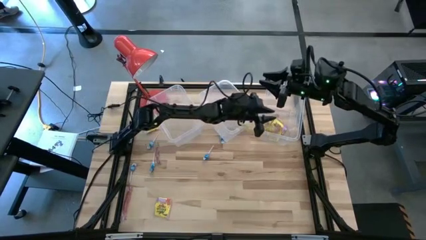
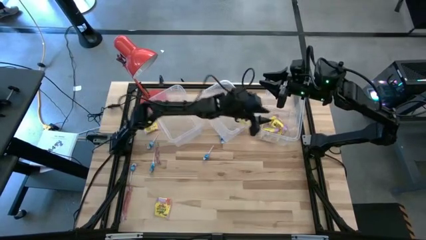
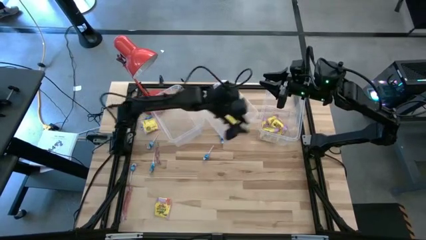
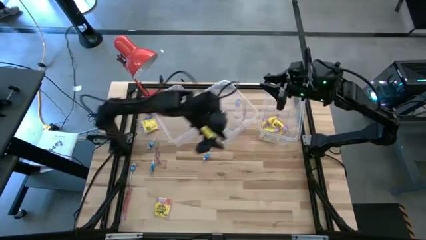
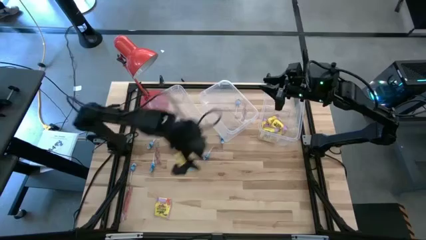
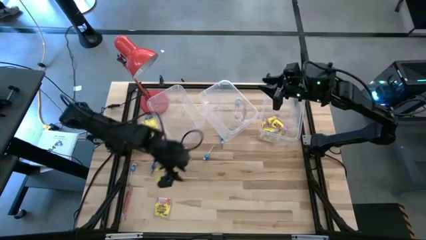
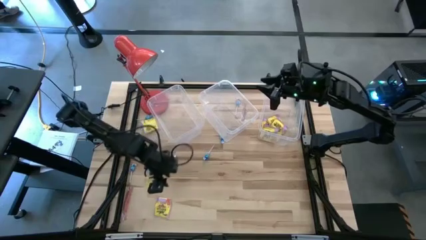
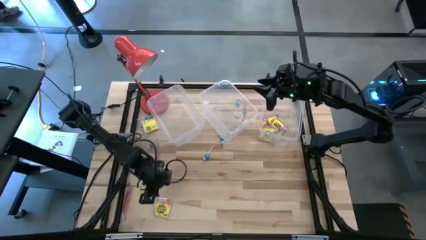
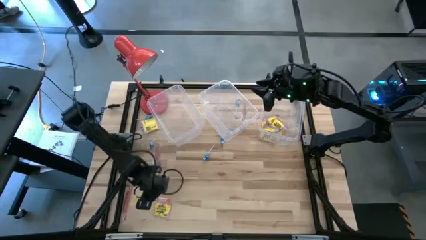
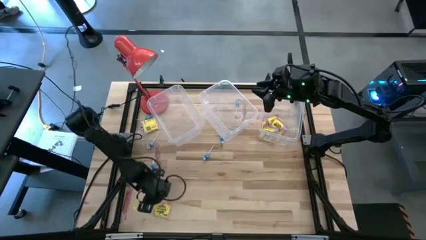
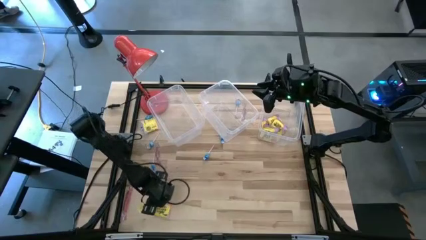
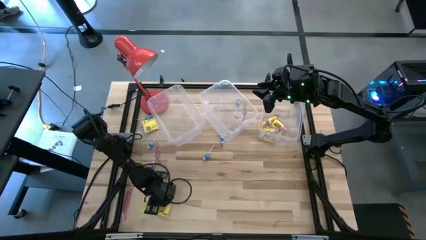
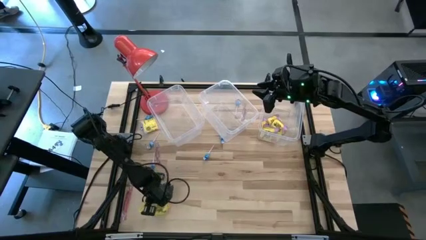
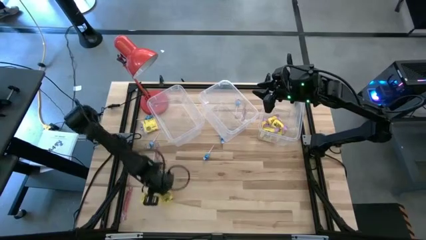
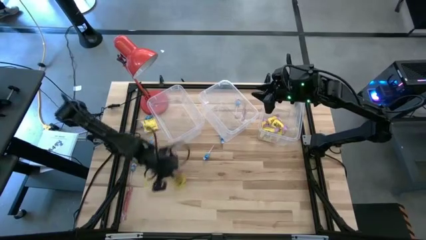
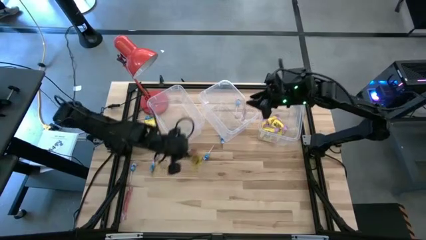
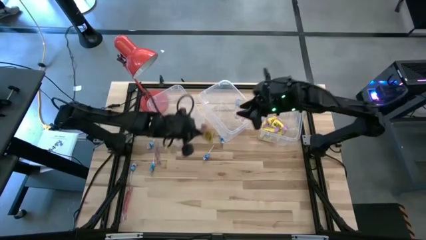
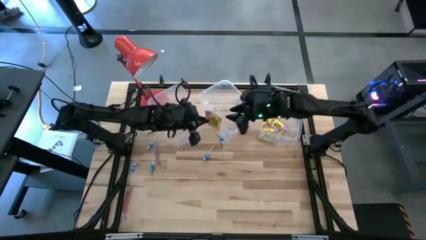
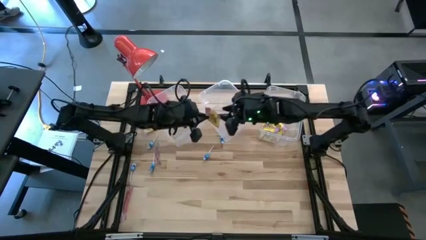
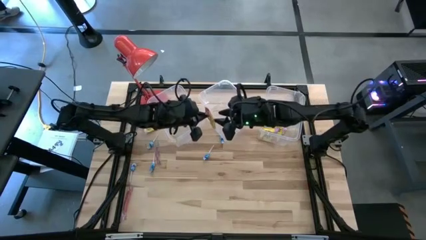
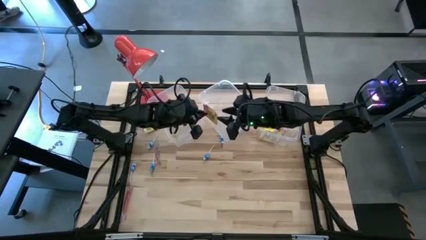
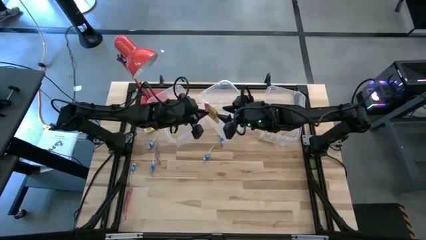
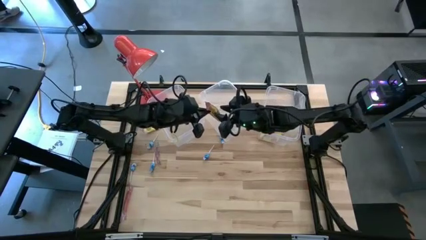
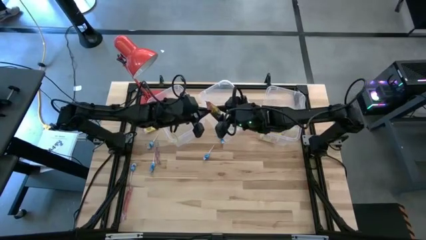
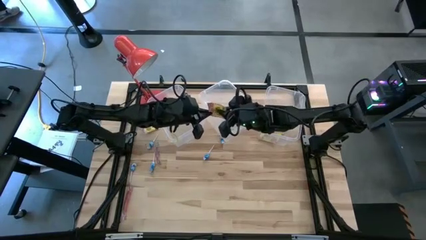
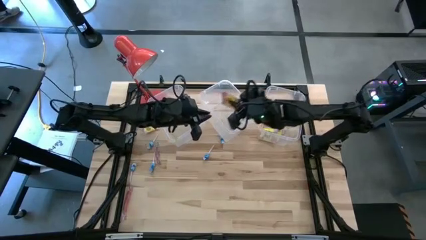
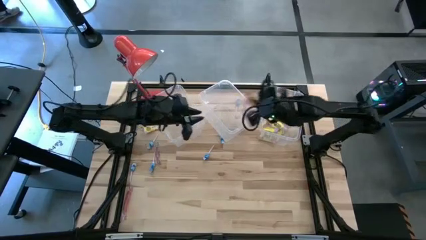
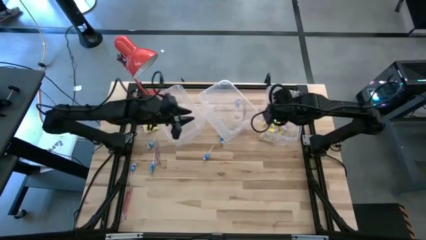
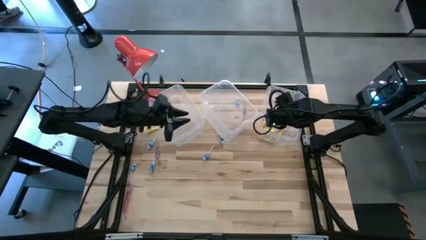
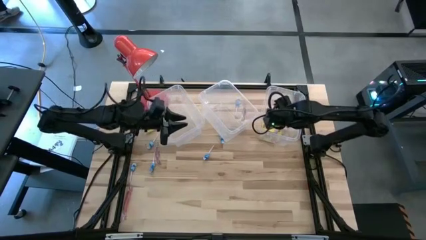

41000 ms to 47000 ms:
Task: Sort candy
Put the yellow candy into the right transparent bin

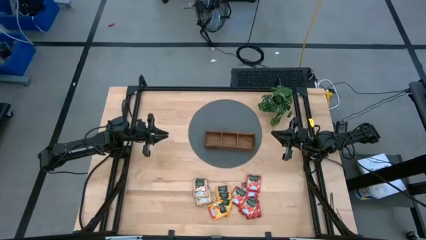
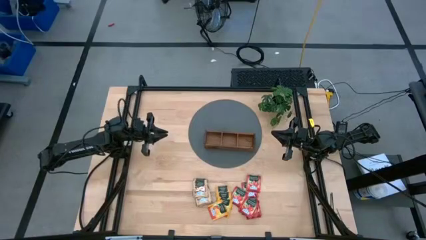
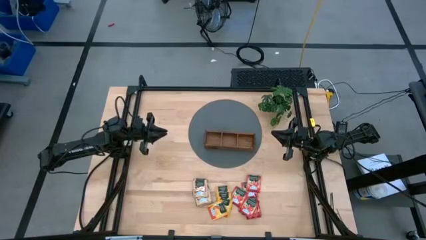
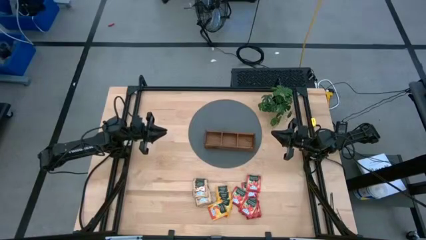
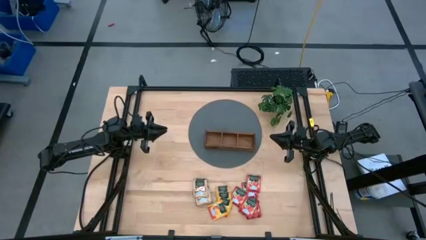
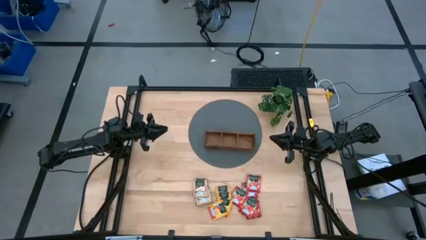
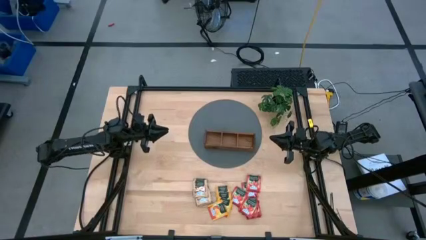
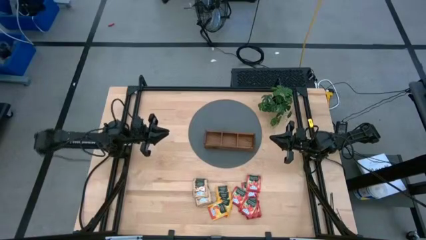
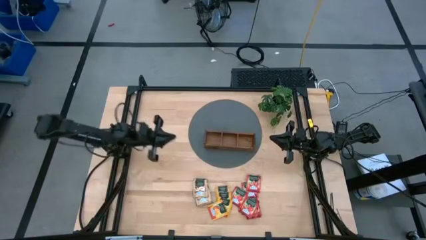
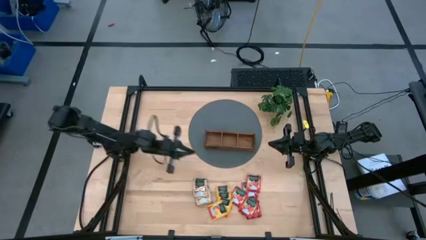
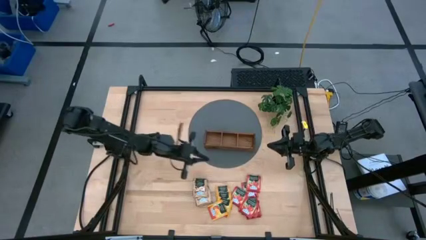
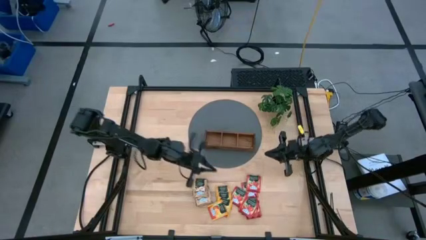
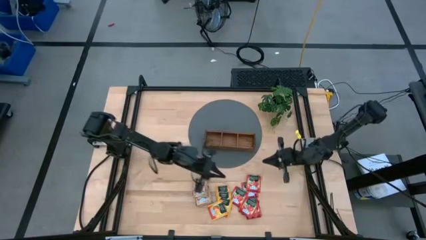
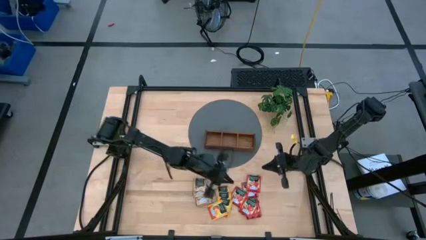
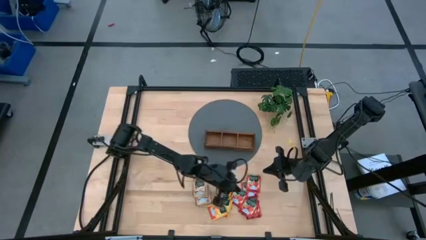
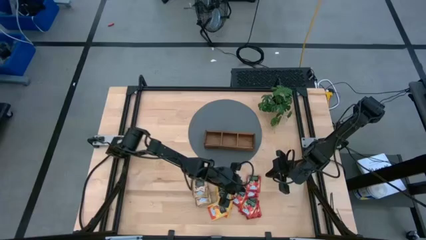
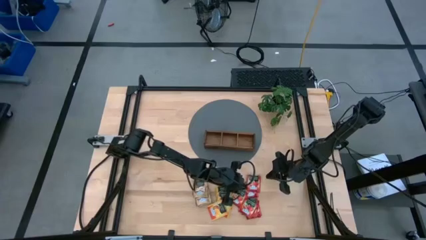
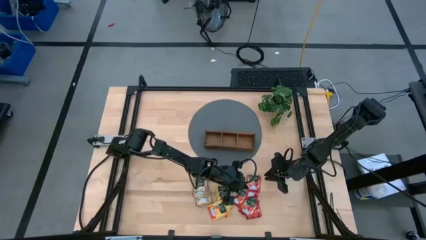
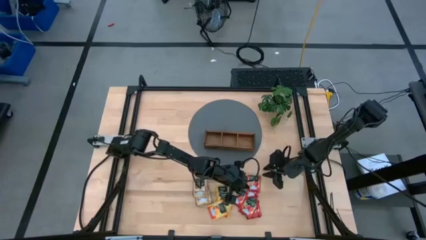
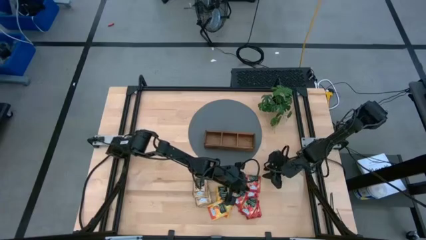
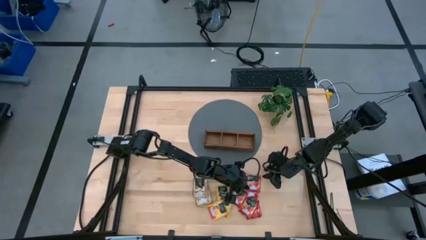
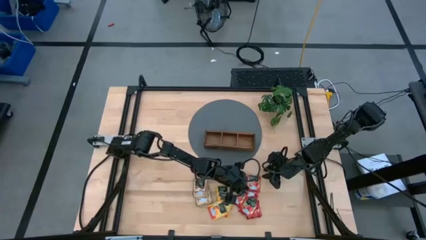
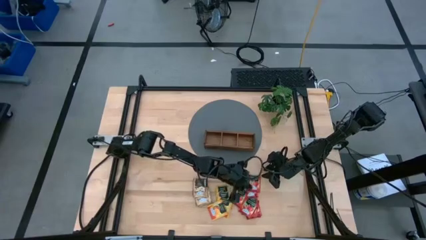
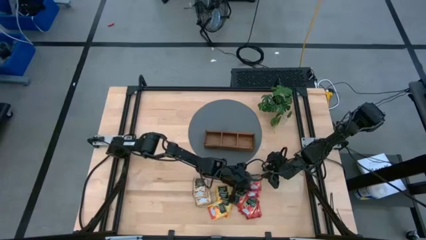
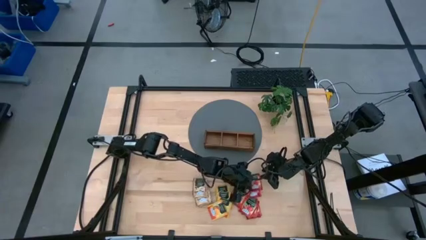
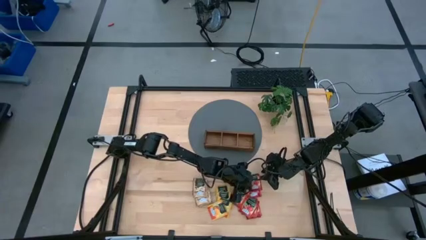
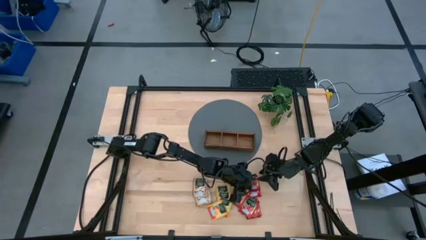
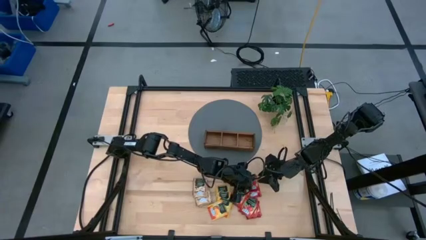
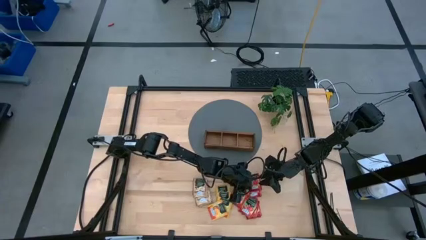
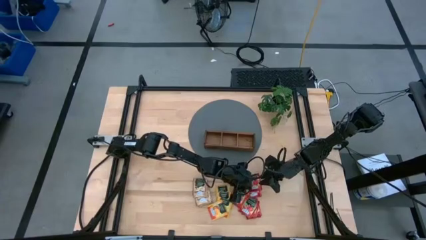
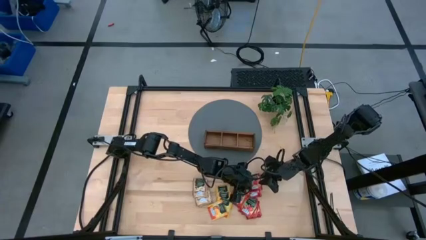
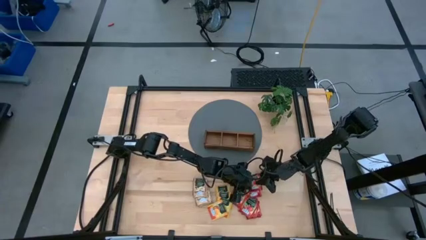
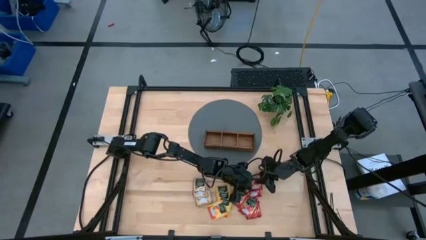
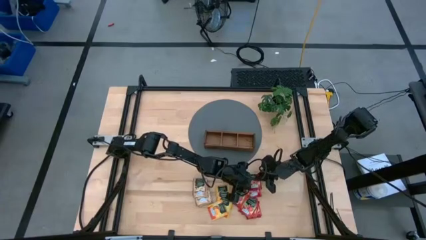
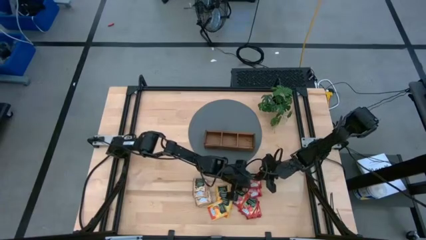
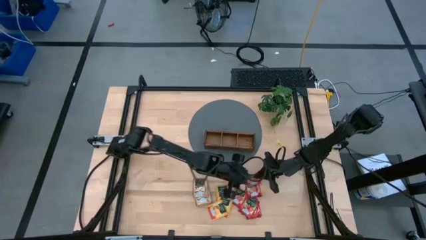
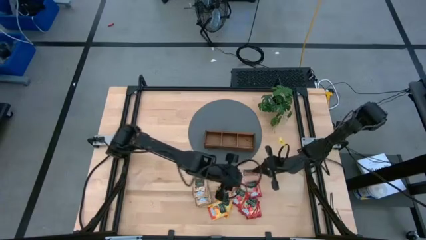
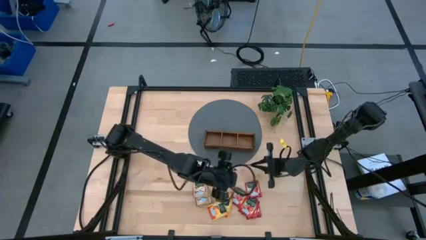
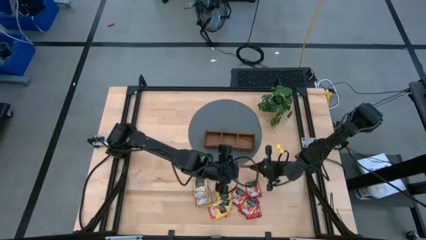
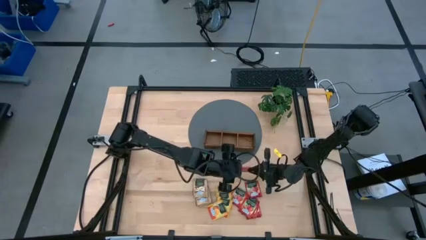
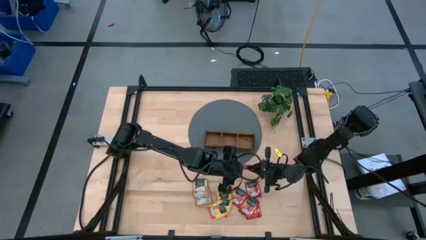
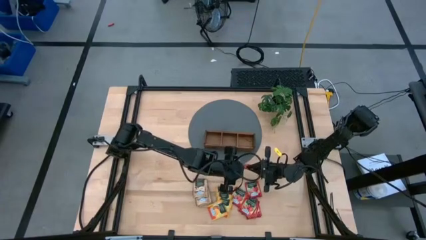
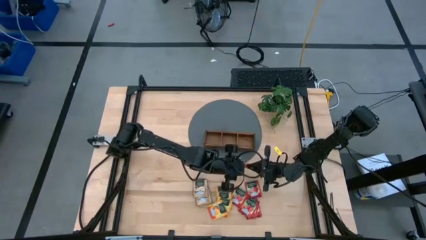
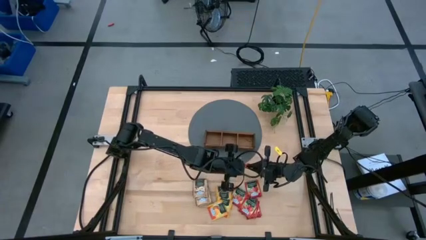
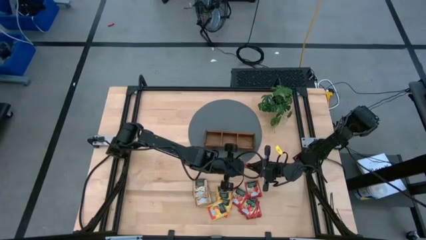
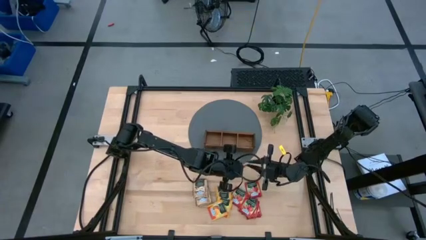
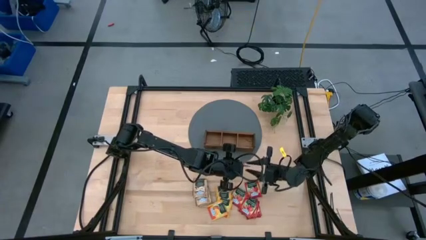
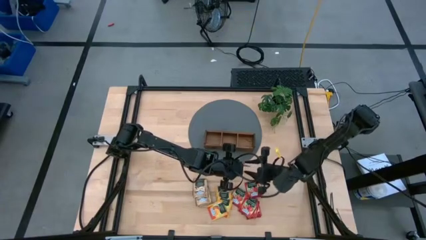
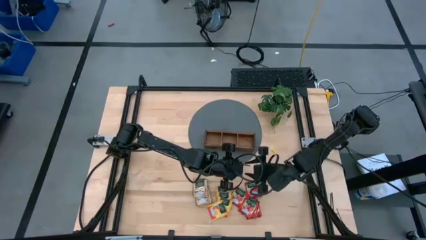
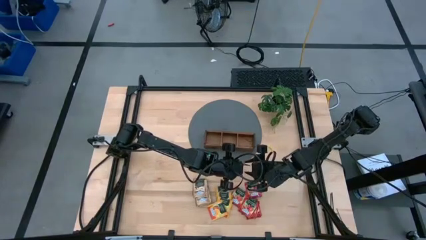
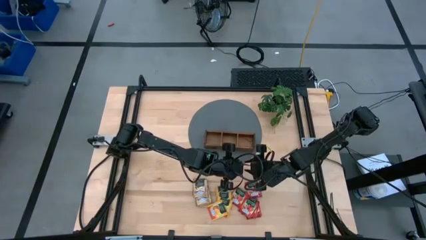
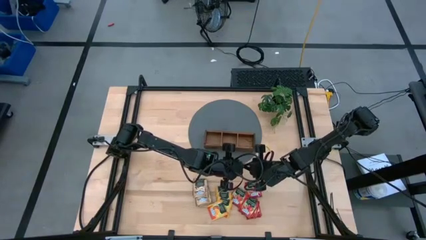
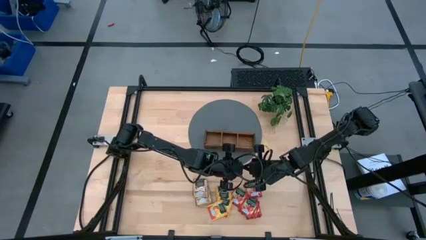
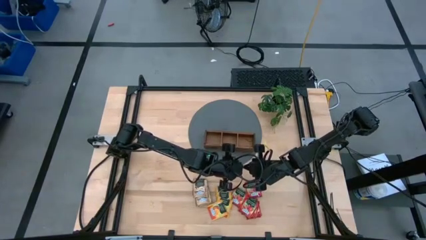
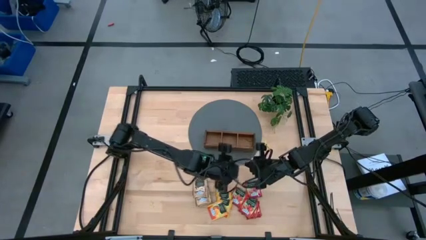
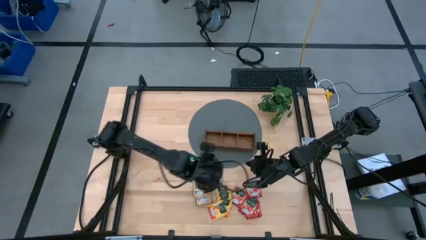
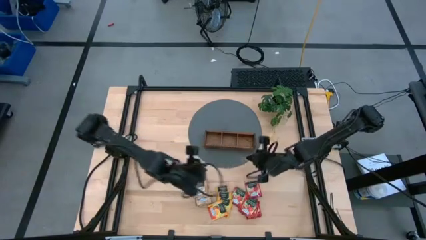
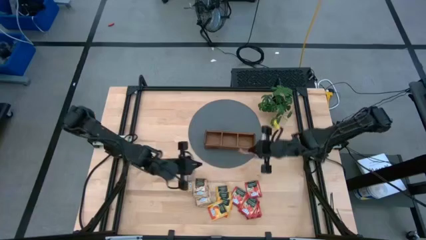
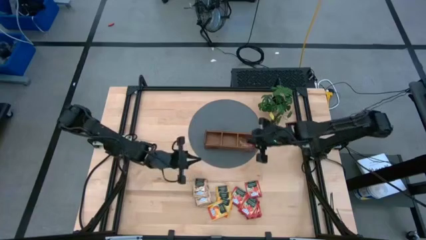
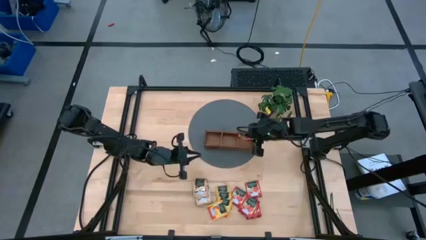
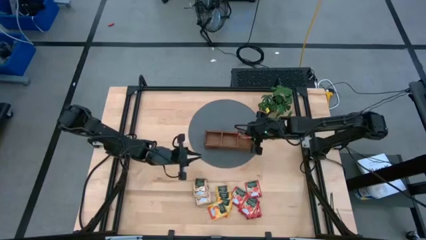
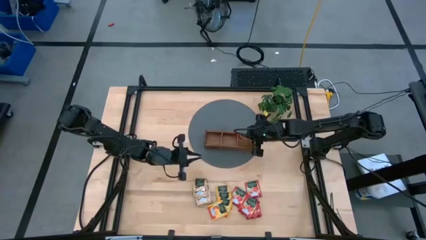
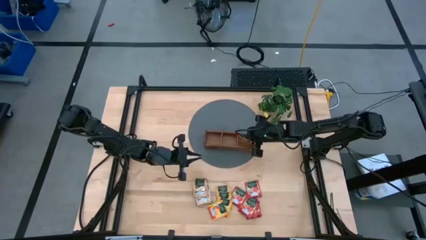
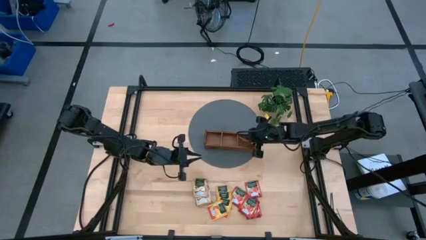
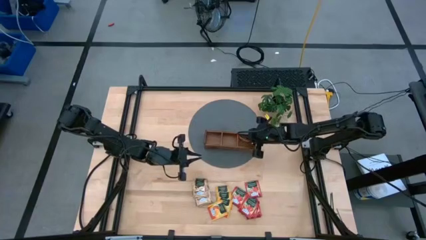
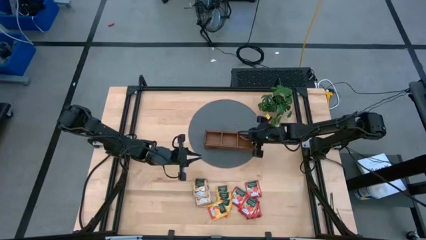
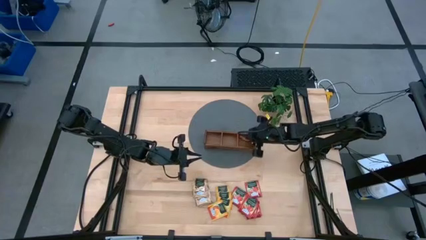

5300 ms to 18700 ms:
Task: Pick & Place Tea
Put the red tea packet into the right section of the wooden organizer
